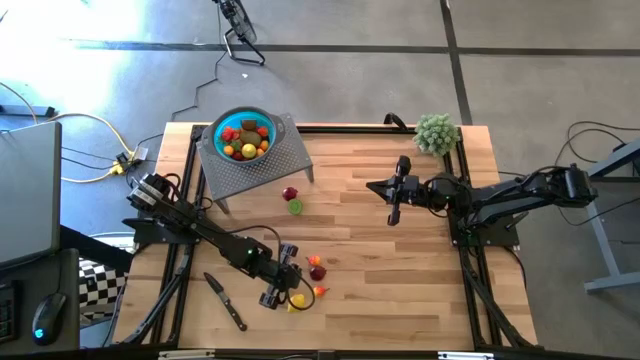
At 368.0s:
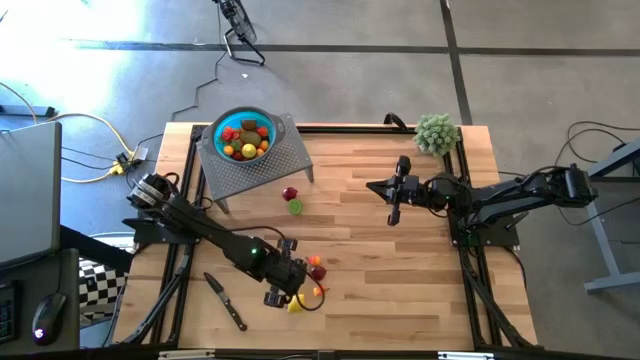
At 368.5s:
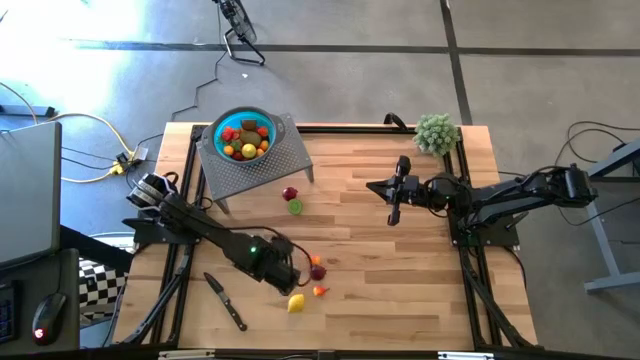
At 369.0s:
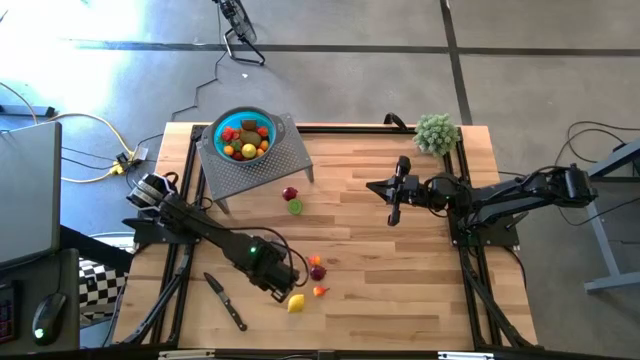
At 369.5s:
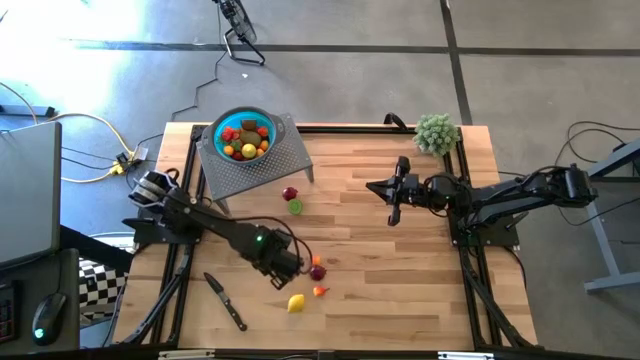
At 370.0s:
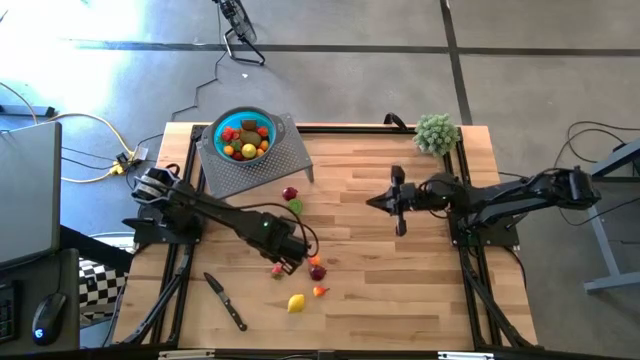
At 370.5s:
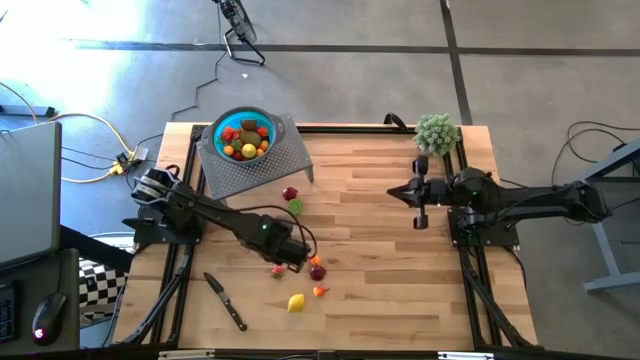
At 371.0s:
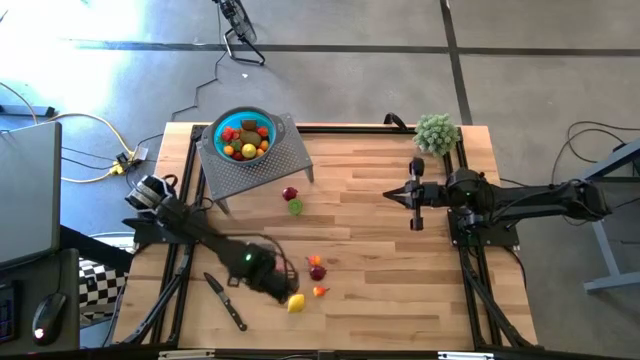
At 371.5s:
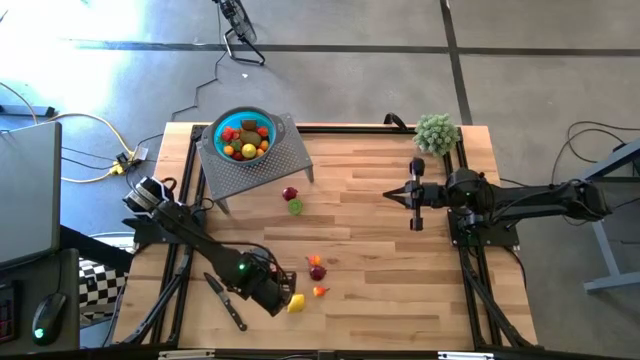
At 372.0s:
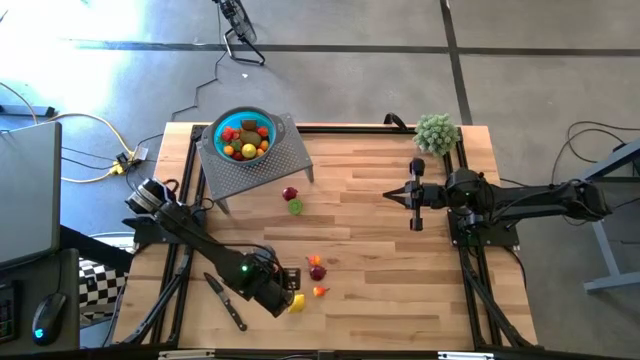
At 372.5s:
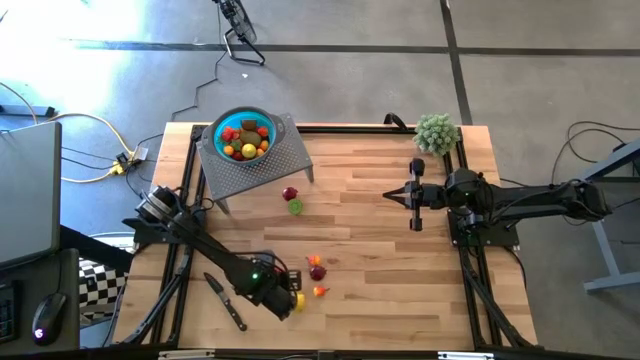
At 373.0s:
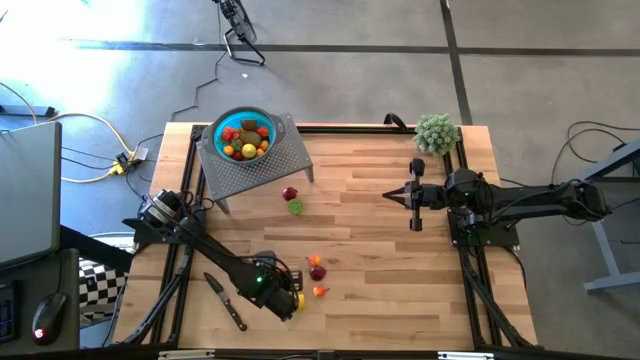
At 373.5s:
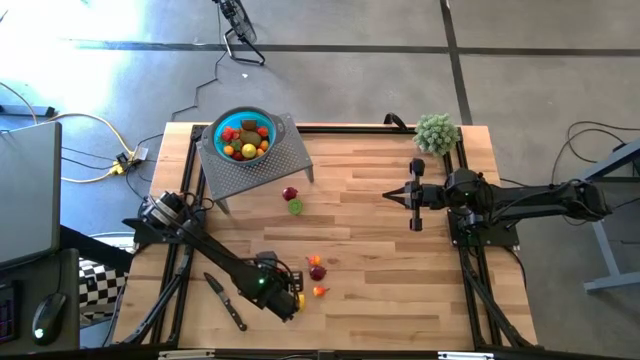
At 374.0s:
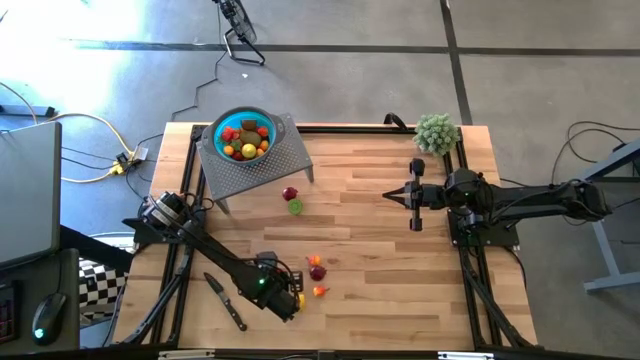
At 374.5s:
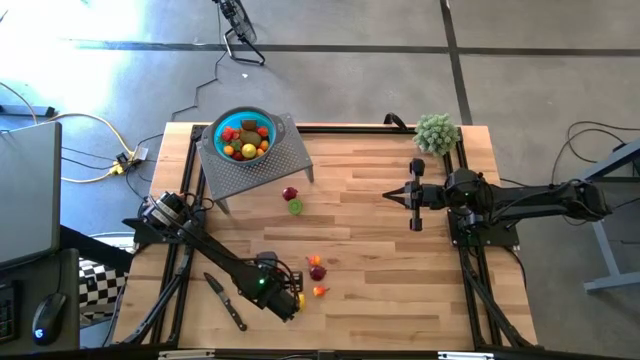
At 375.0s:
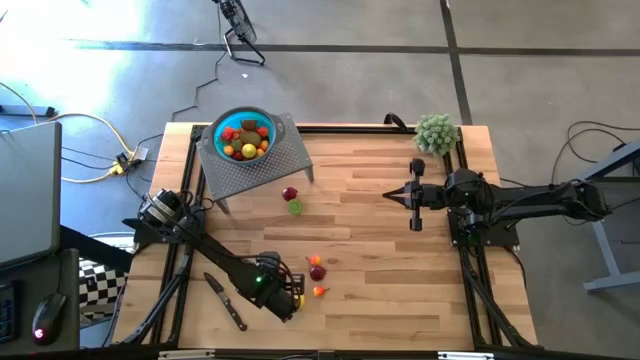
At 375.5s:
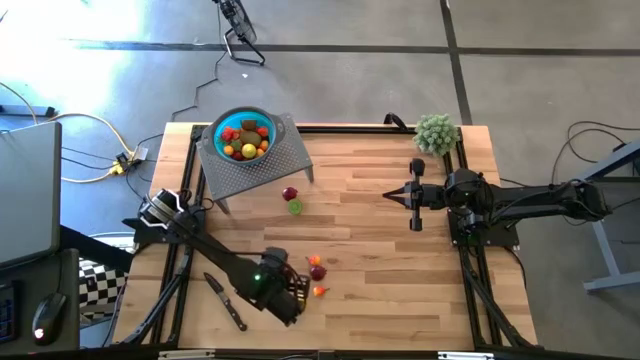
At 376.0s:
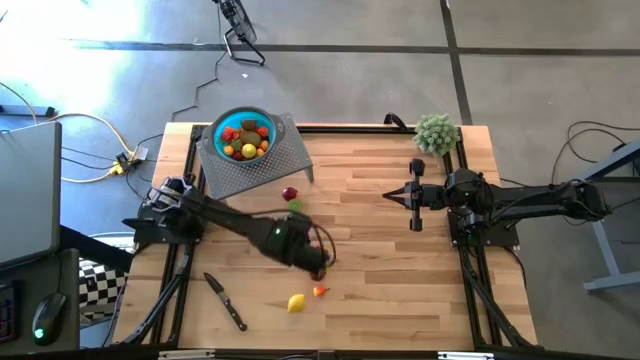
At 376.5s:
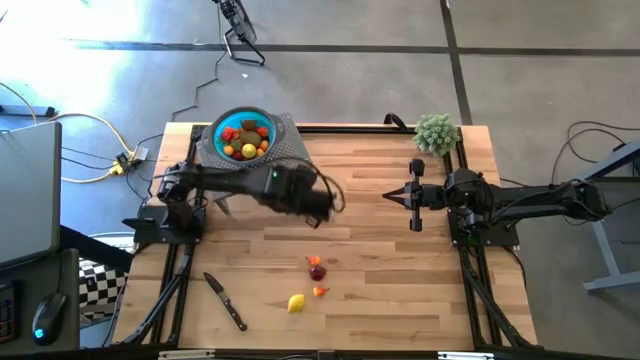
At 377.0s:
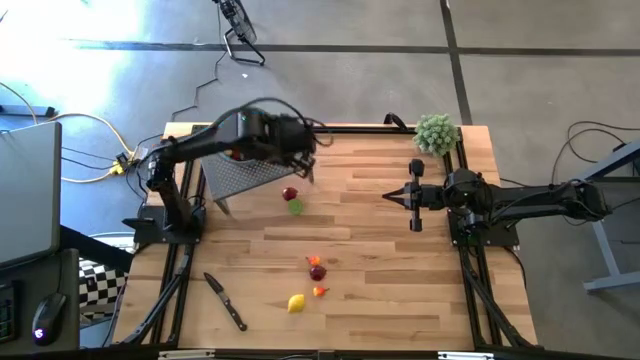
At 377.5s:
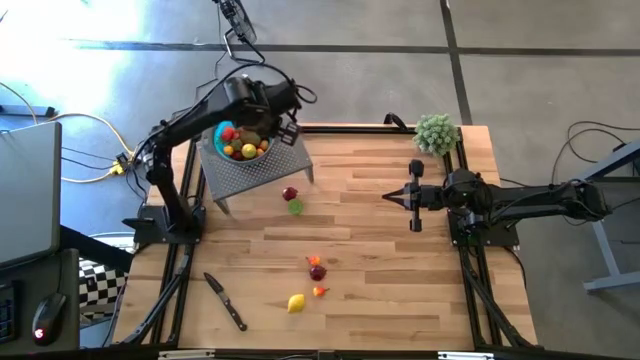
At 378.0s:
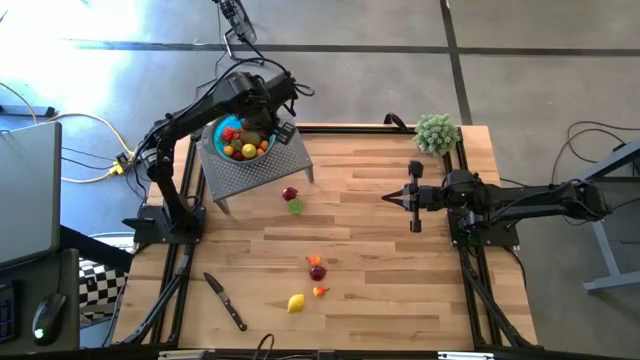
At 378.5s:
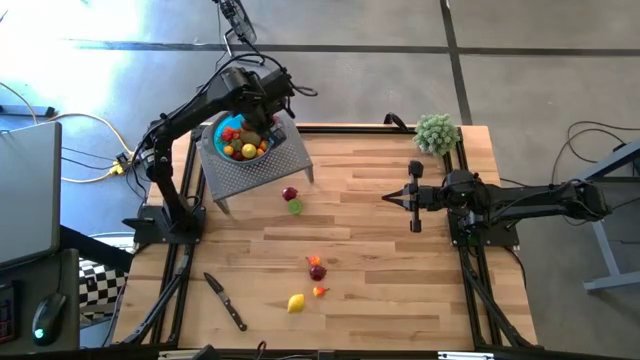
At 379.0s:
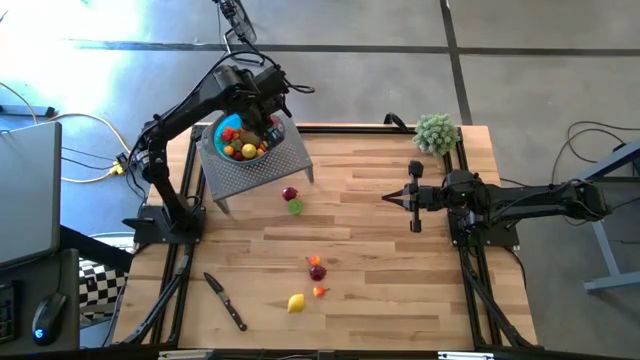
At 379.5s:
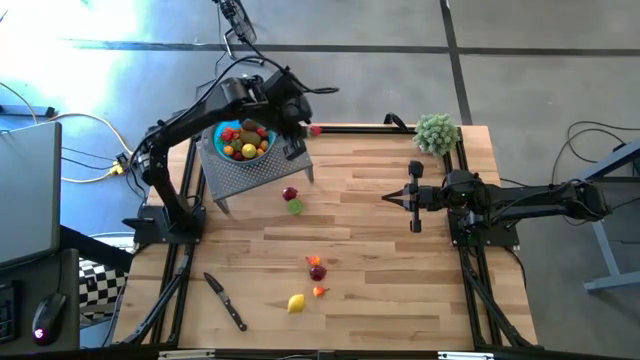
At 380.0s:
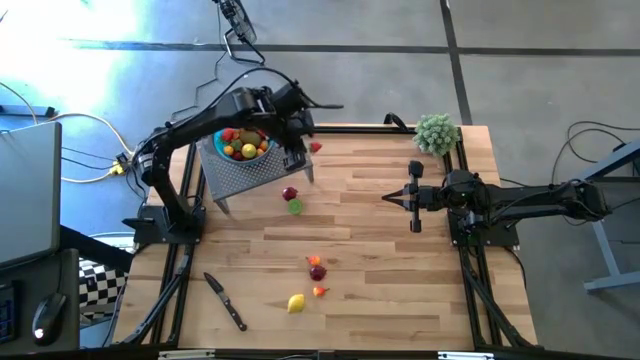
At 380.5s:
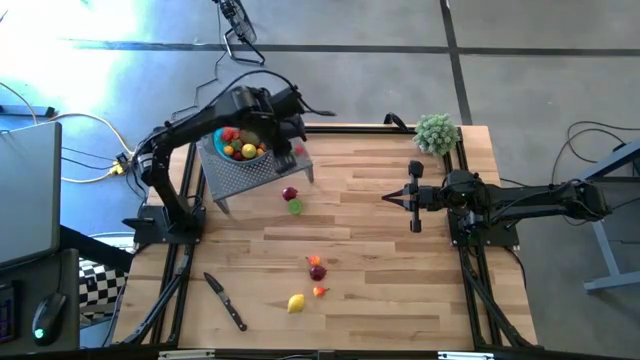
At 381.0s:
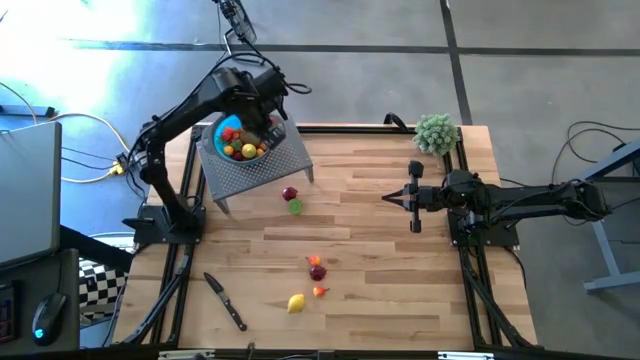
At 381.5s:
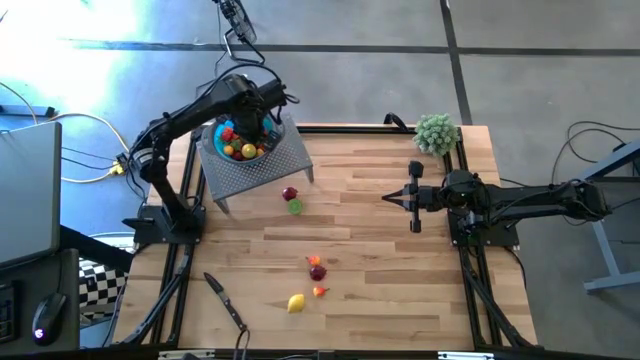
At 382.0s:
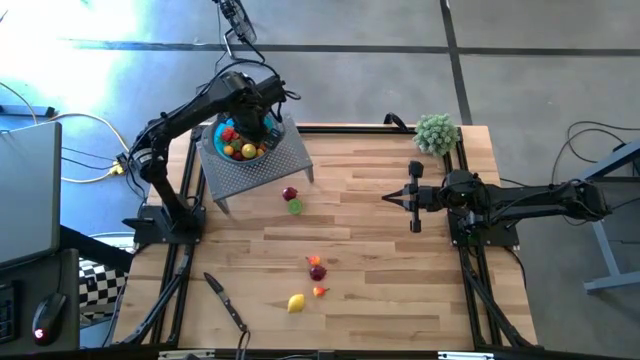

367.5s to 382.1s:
Task: Pick & Place Fruit
Put the red strawberry into the blue strainer bowl on the shelf

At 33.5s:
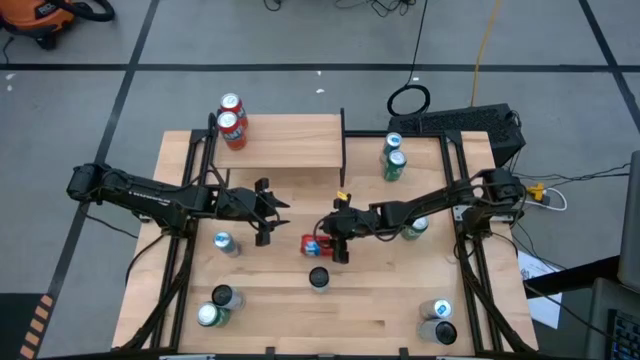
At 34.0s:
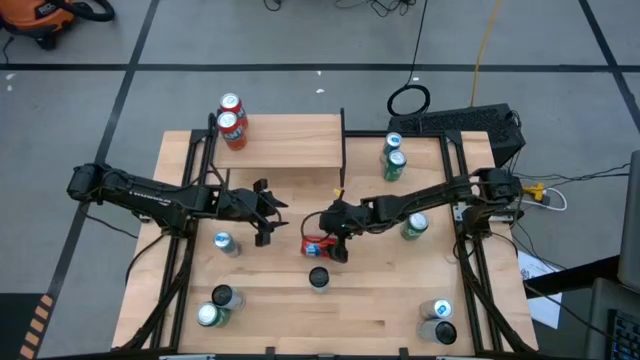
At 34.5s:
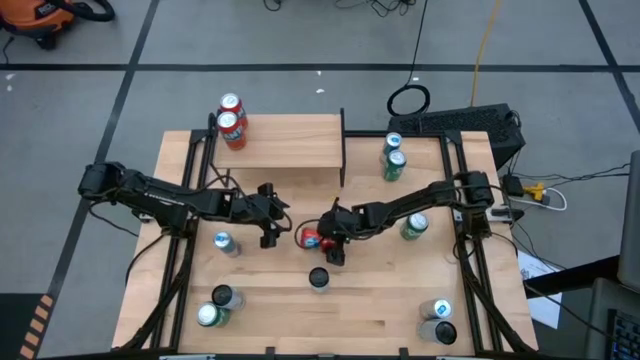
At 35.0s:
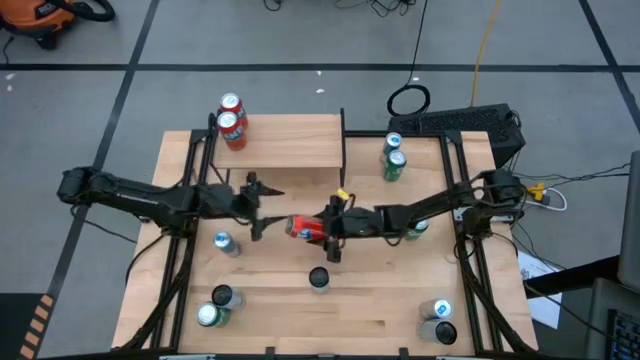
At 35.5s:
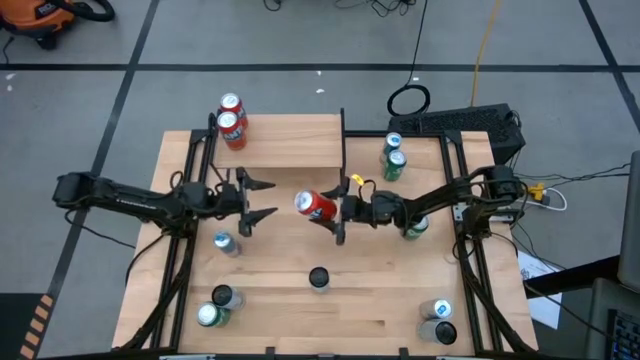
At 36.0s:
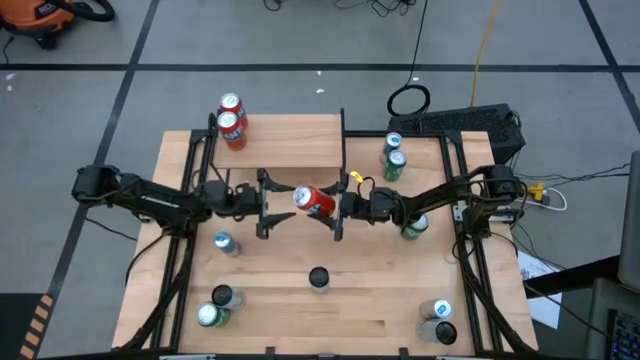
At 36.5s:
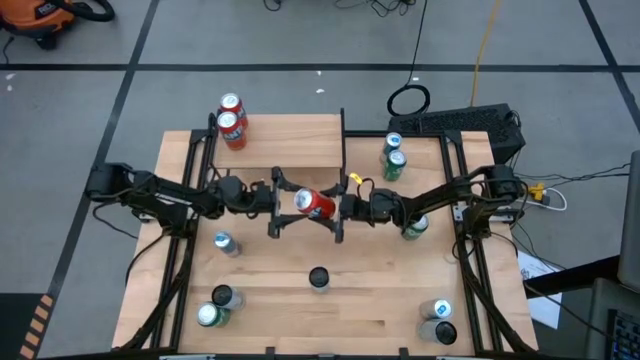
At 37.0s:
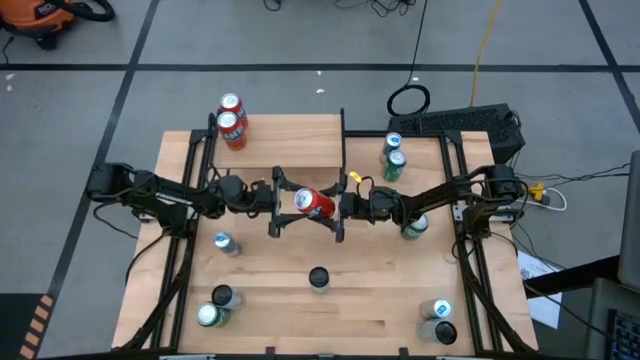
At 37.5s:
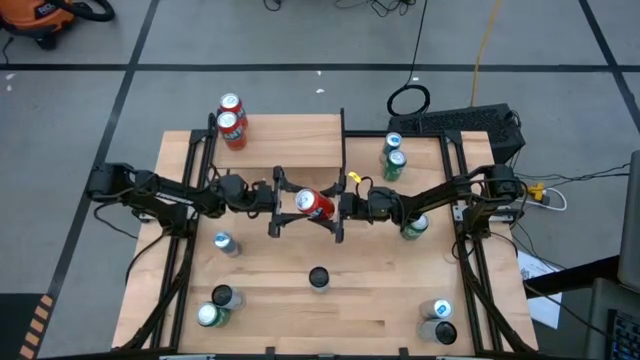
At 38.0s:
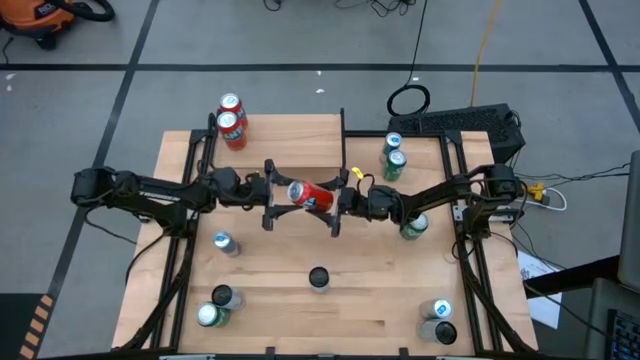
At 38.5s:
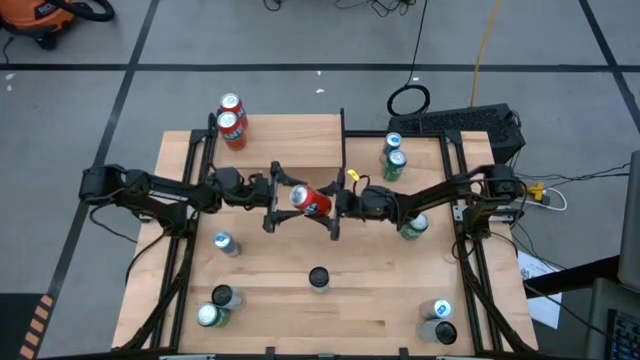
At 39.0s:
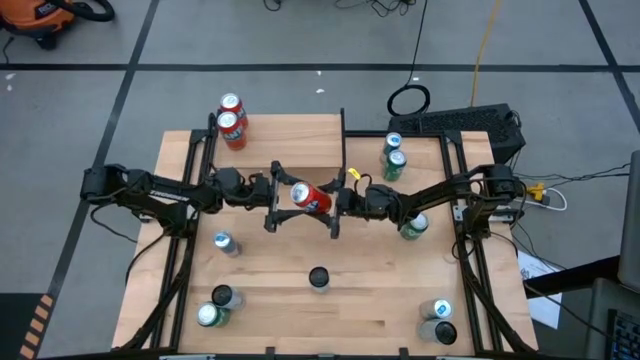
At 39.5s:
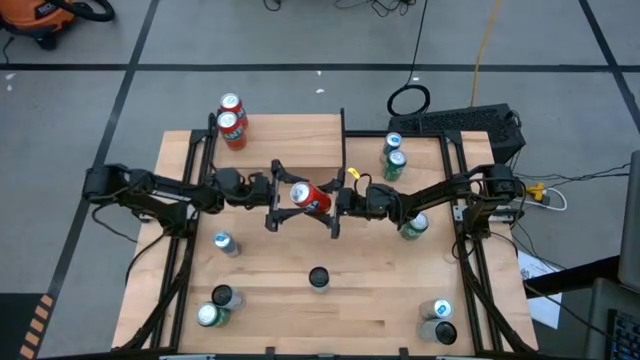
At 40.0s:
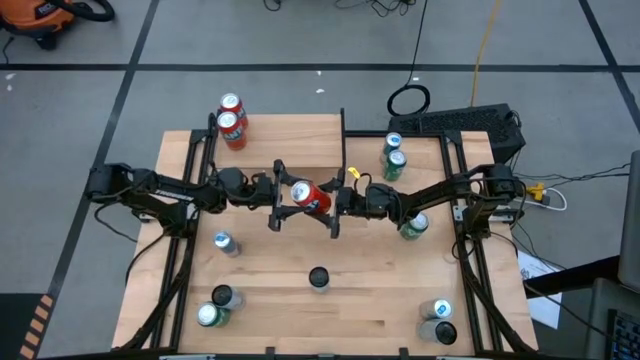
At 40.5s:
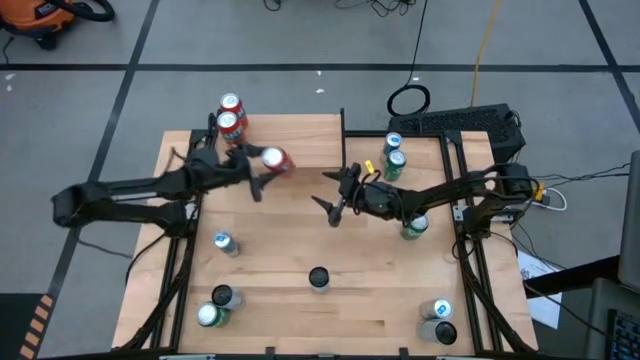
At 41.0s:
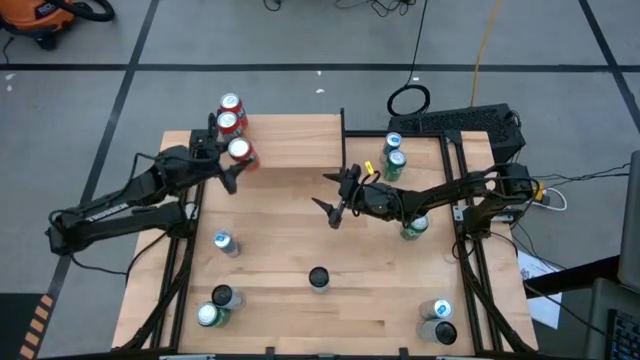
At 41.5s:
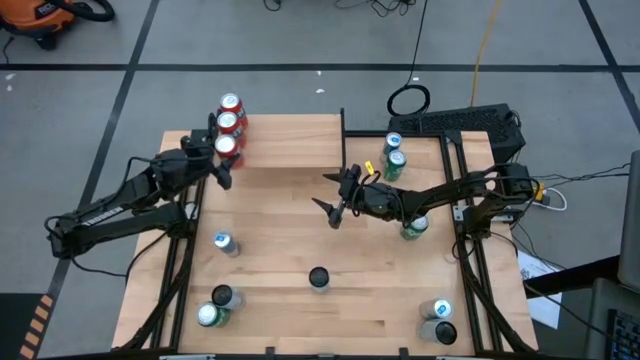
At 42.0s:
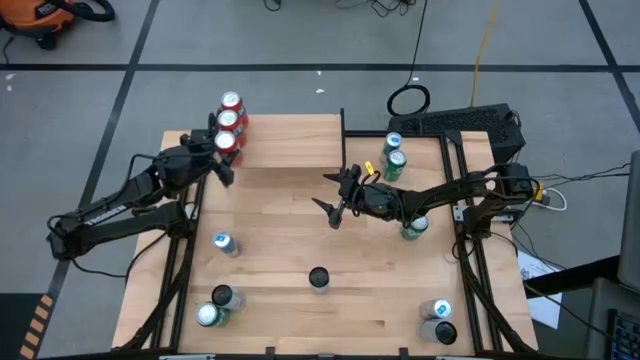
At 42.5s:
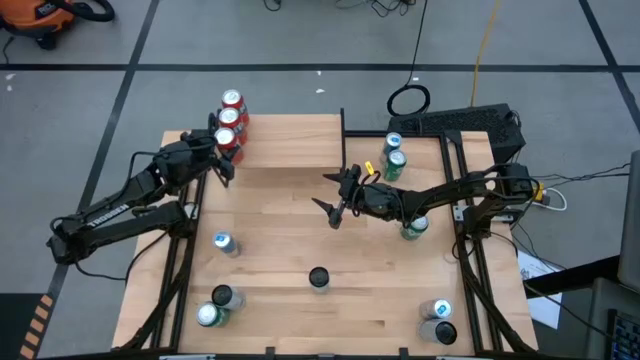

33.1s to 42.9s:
Task: Place canned beverage on shelf
Put the orange soda can on the shelf
